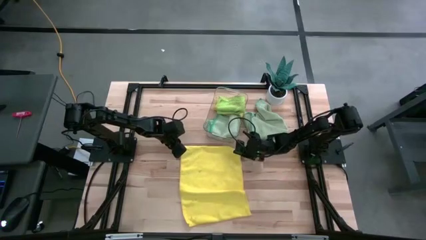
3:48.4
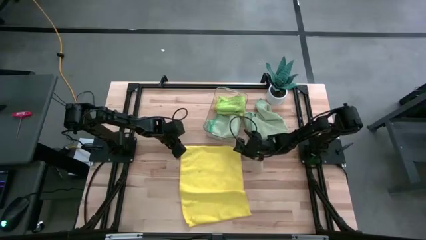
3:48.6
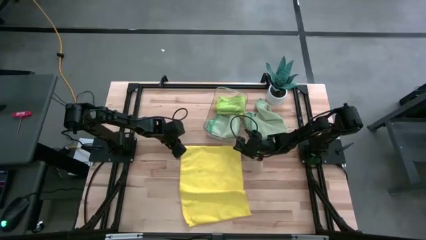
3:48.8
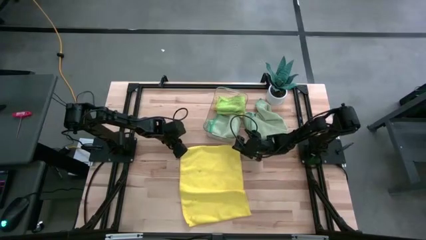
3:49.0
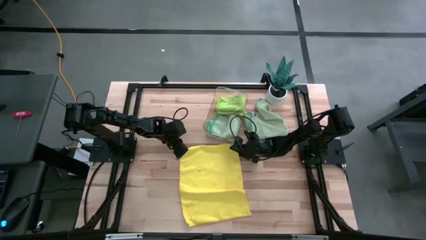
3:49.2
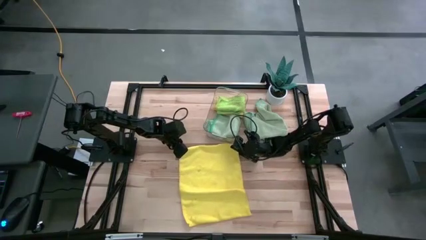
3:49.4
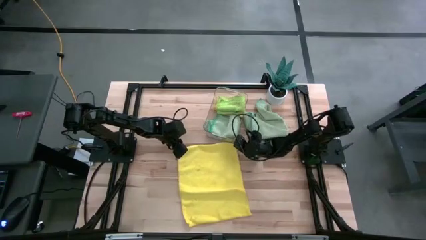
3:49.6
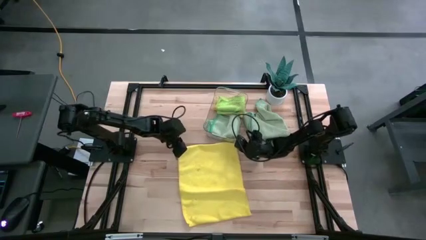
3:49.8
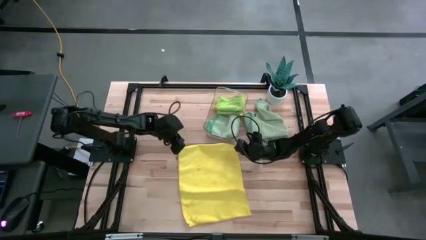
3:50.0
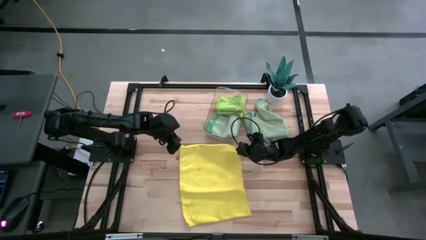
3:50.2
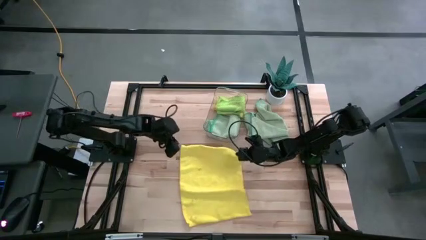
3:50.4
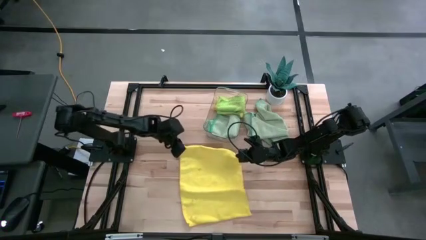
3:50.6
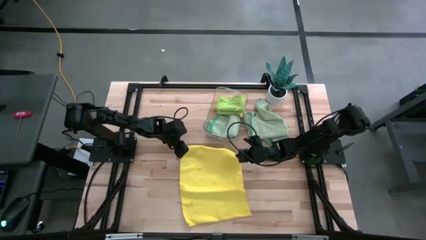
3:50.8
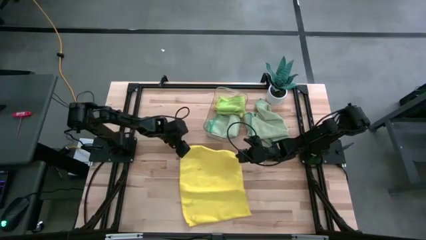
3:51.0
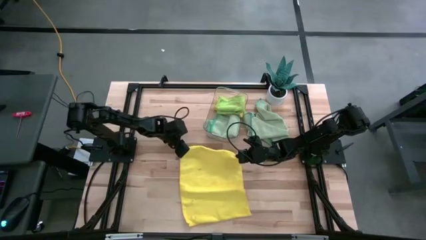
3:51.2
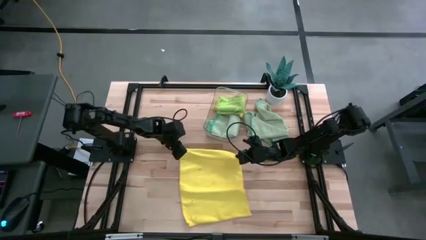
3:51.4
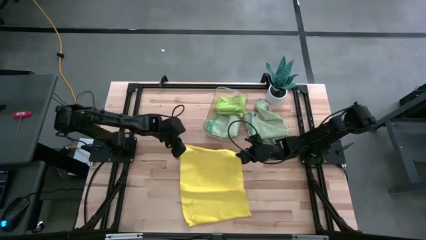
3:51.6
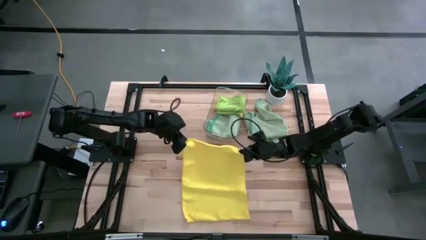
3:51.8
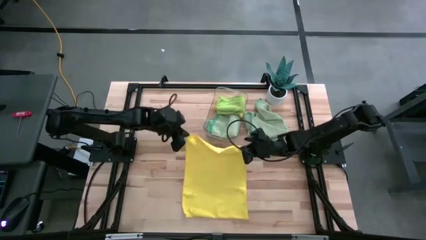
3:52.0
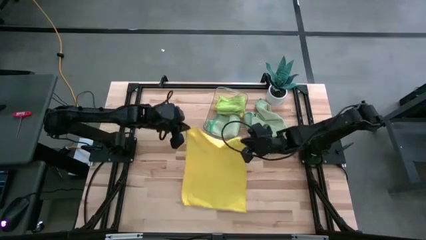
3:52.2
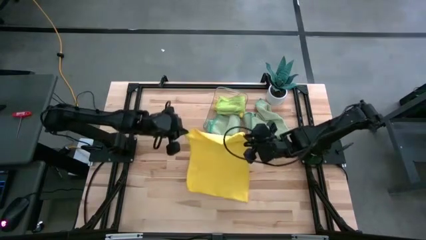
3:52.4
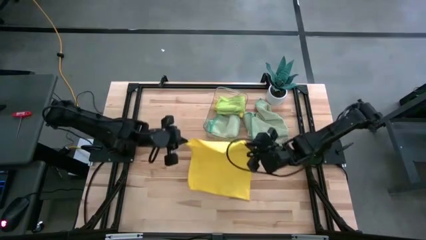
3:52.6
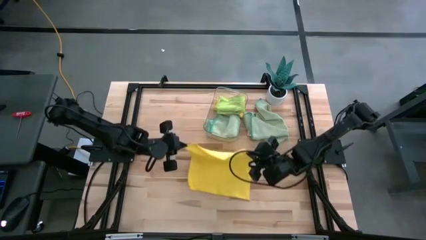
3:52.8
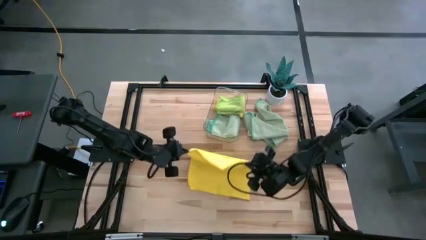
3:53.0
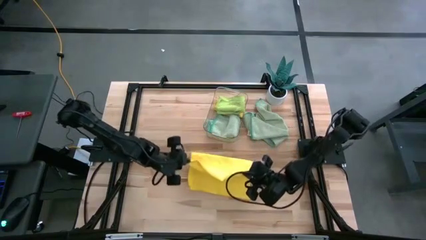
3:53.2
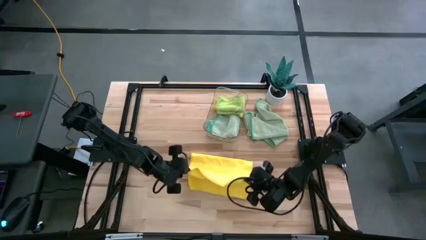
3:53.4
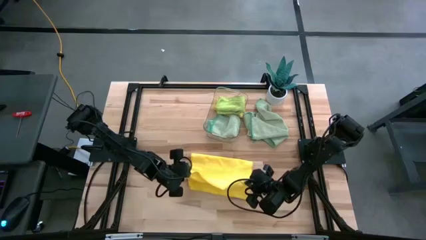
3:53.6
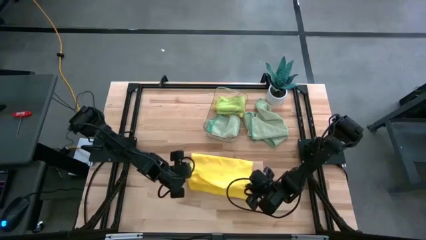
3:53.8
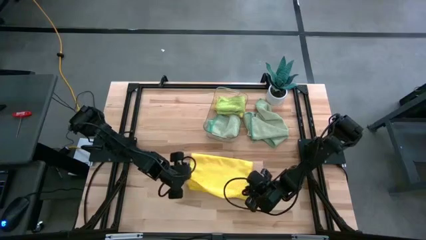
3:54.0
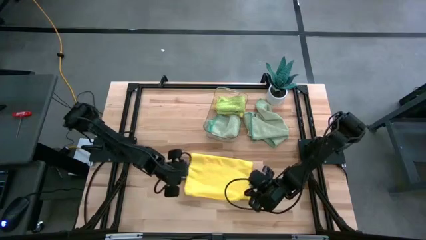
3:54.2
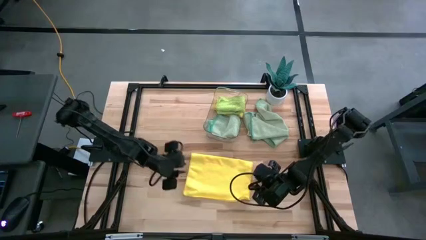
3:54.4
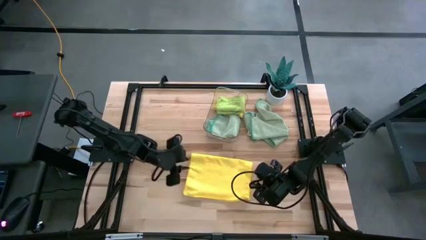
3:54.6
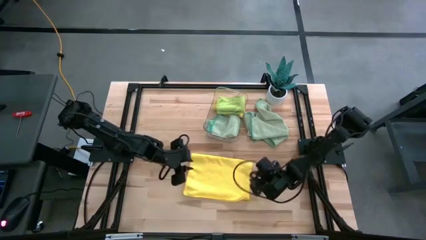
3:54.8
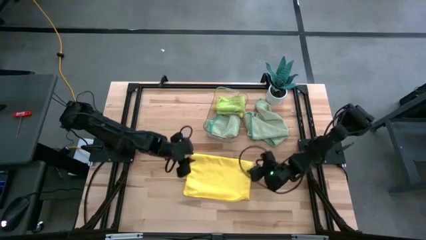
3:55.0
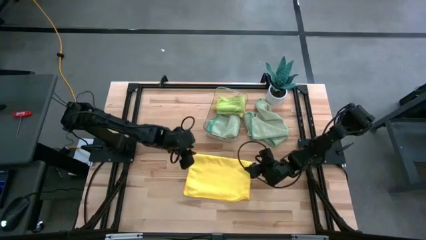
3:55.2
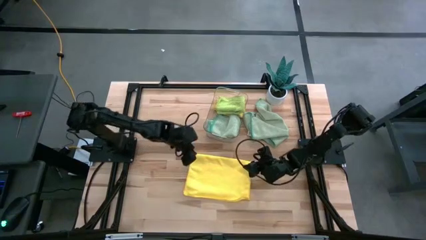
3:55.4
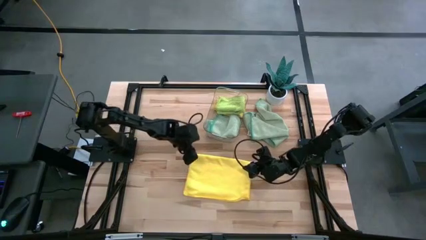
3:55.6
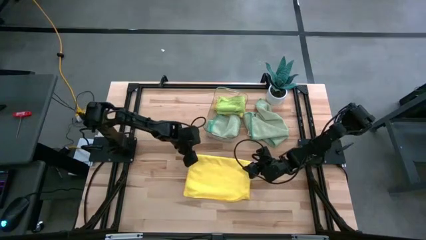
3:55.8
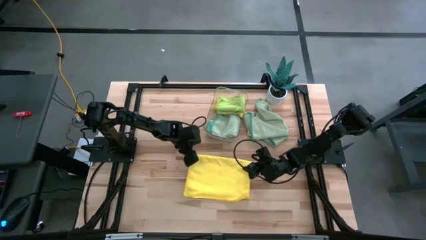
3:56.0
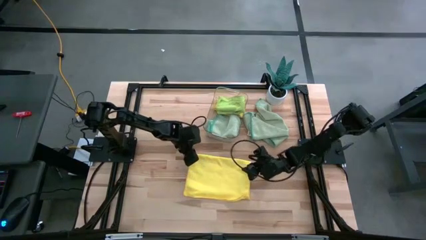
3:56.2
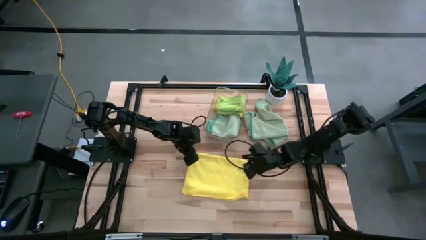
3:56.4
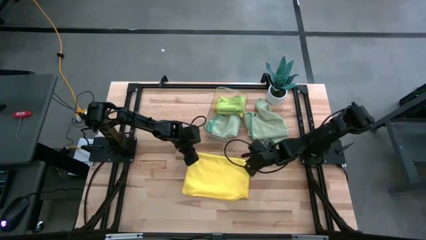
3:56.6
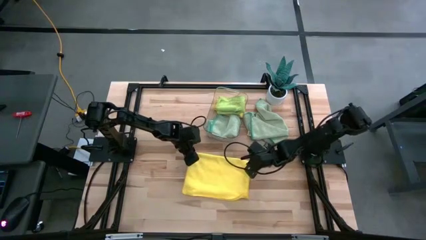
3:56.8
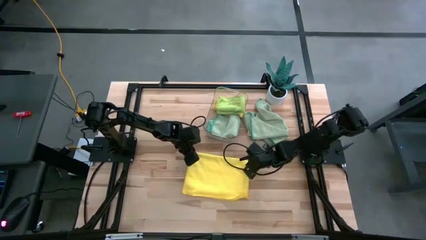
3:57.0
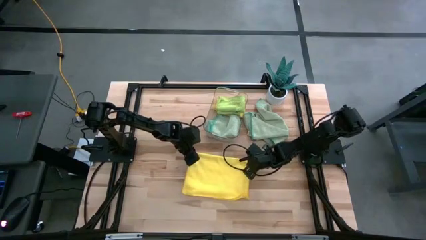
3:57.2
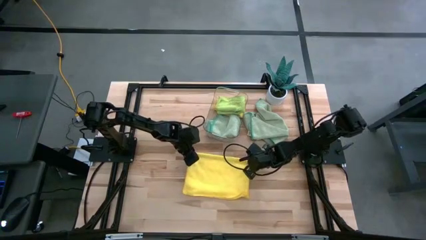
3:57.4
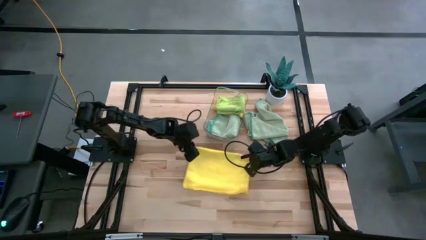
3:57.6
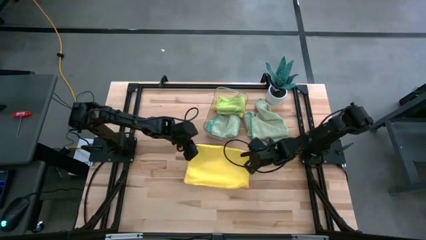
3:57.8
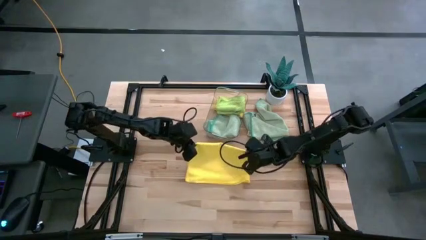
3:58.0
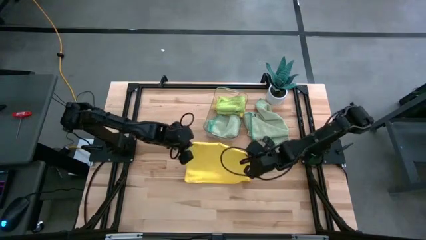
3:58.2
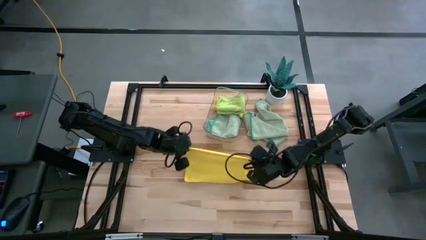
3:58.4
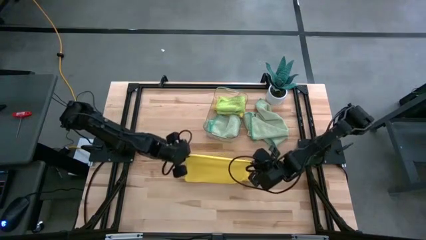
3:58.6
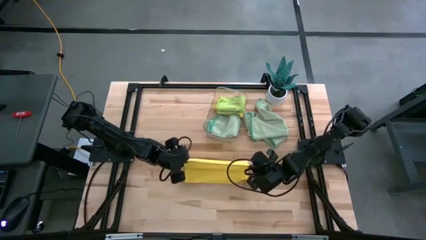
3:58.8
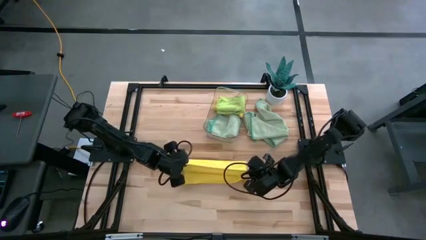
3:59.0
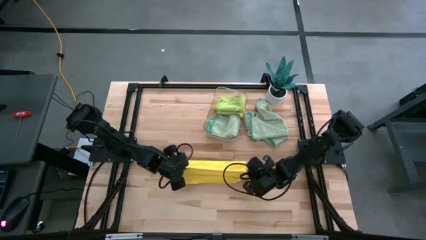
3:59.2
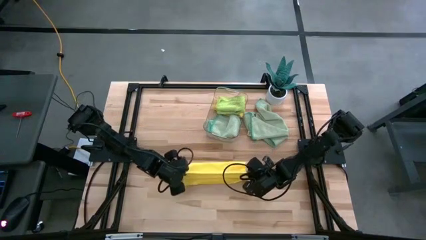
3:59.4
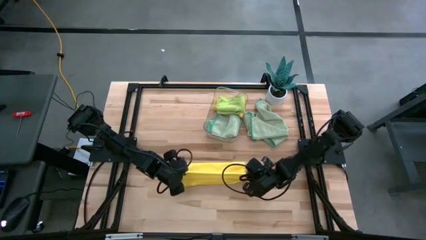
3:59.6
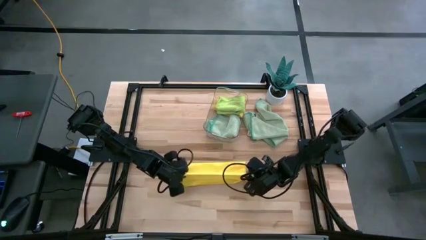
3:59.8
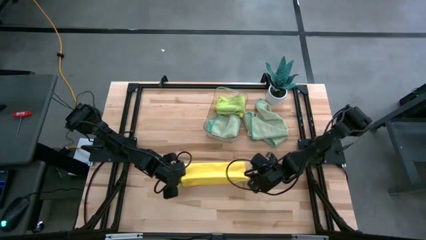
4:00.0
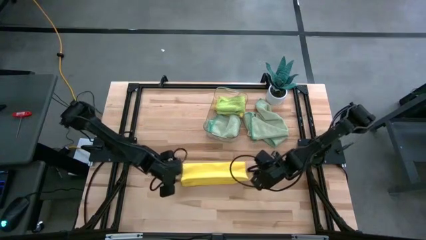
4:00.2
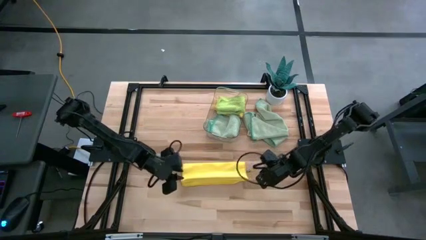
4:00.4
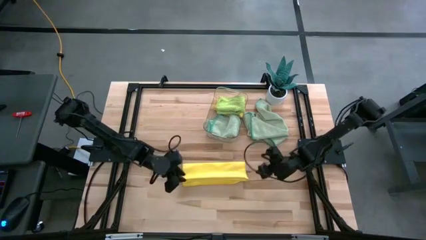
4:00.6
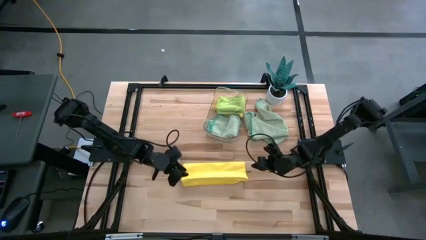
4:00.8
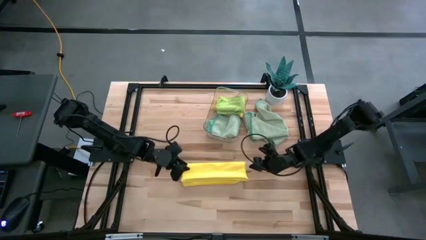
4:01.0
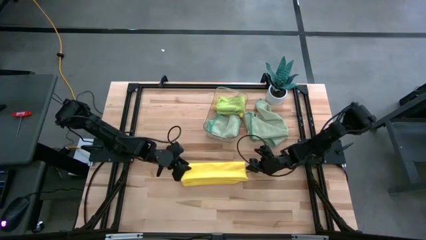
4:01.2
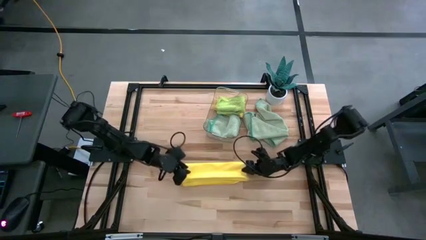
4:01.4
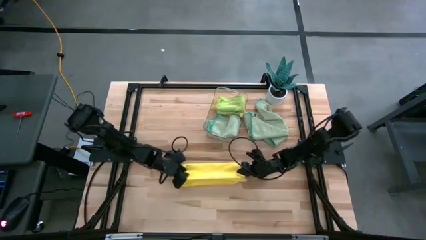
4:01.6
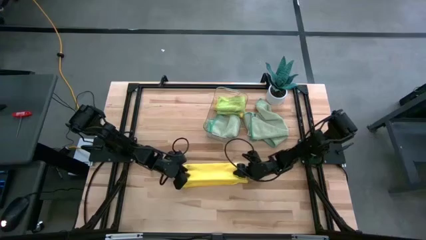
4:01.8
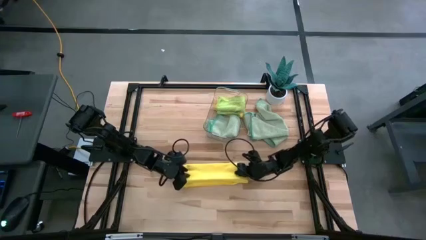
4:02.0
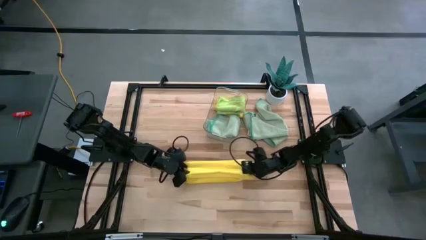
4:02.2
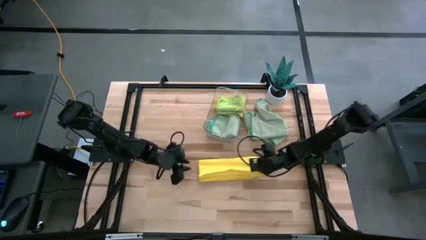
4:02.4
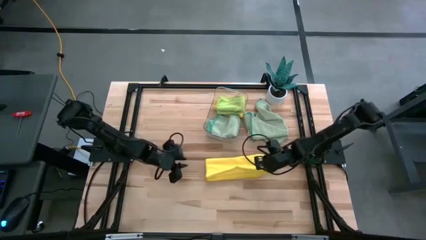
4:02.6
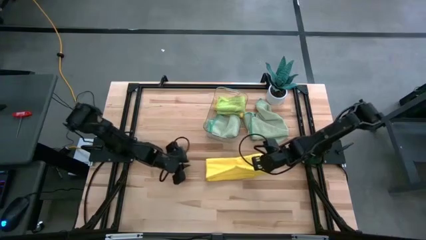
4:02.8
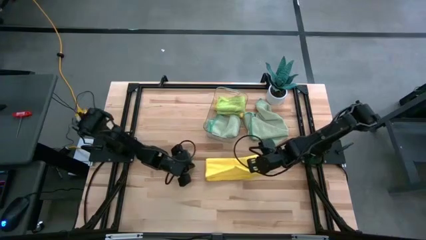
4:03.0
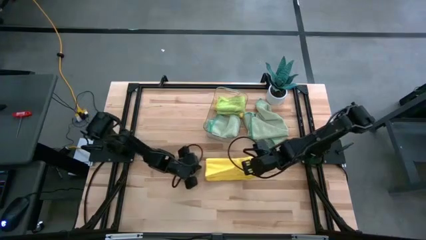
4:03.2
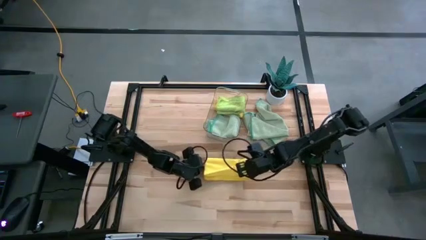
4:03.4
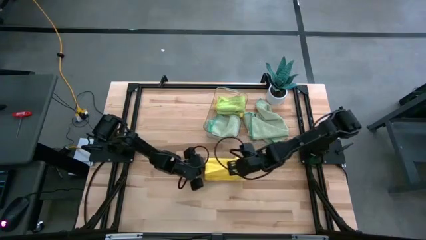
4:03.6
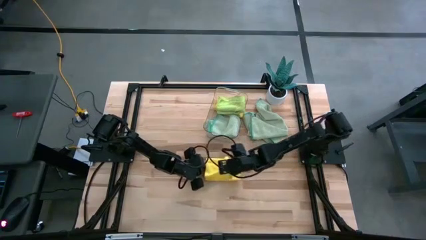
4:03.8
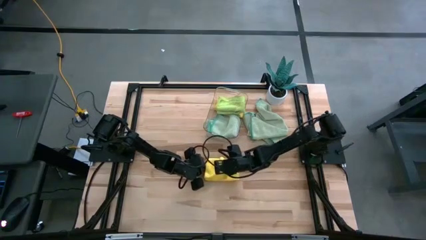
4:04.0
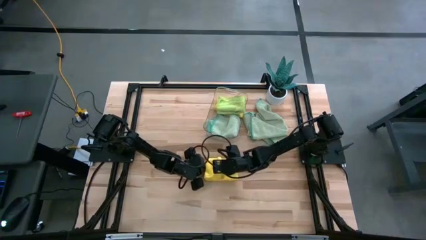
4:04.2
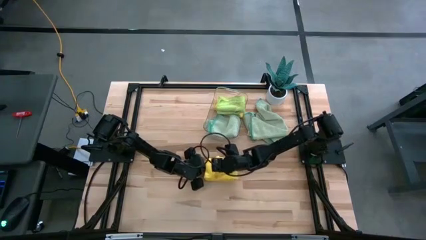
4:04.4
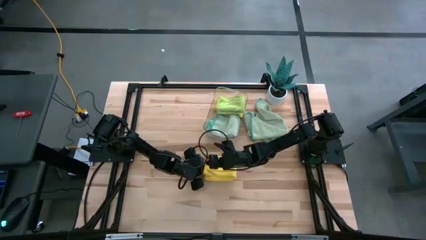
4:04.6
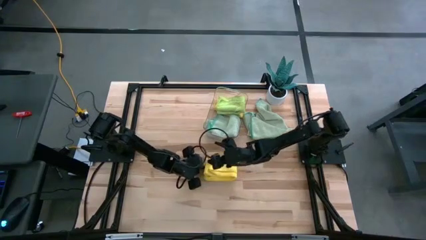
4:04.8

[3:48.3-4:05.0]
Task: Fold microfiber towels
Fold the yellow towel
